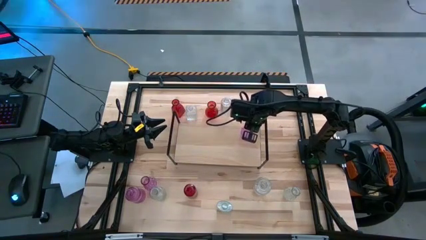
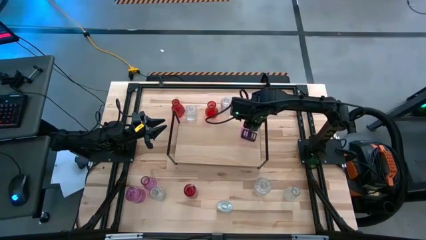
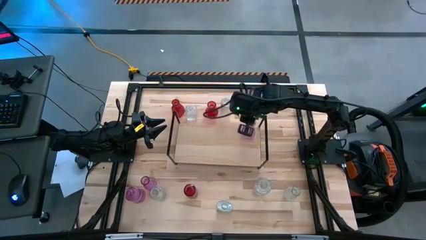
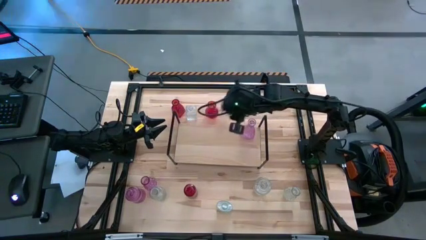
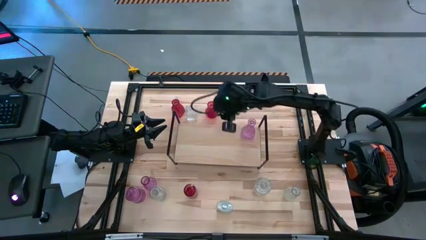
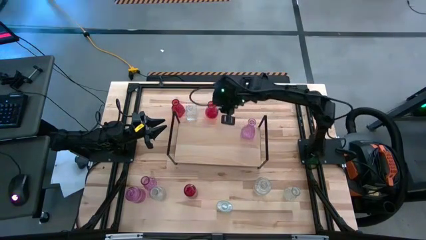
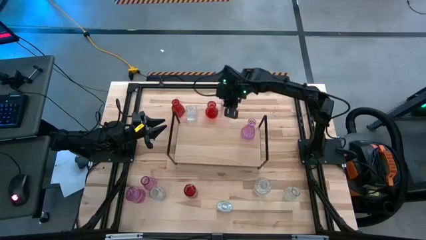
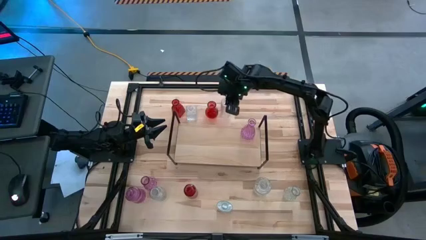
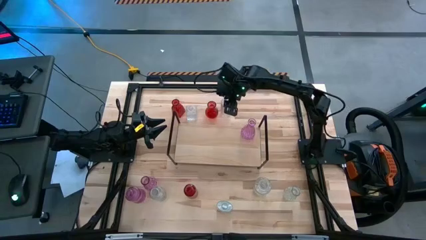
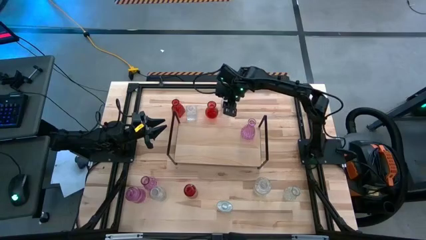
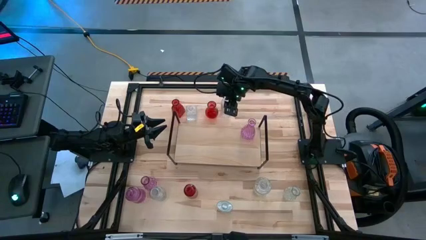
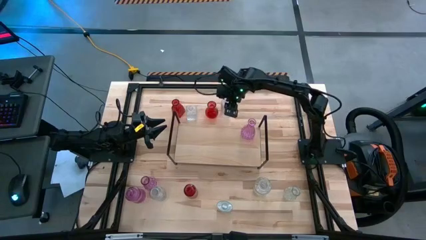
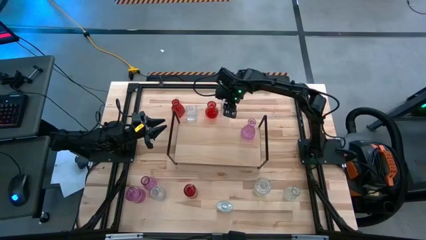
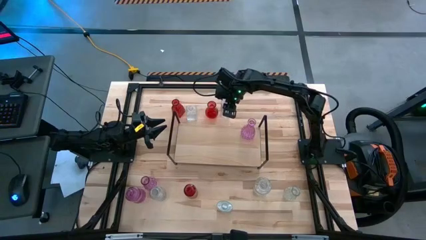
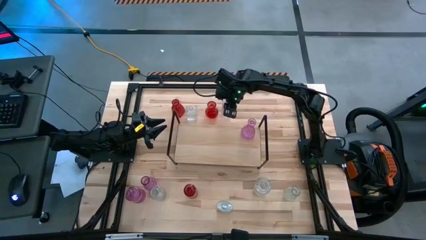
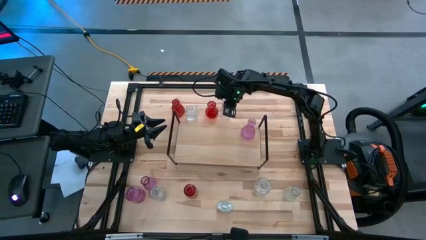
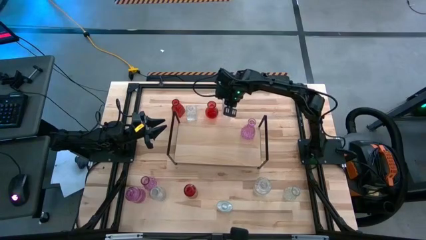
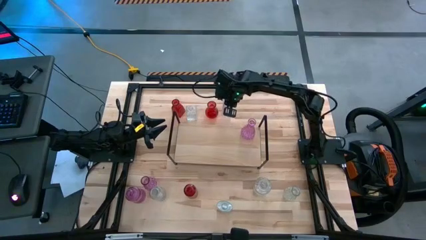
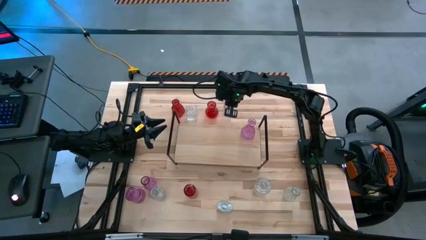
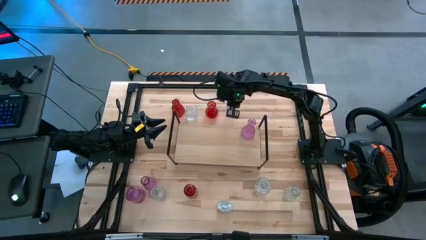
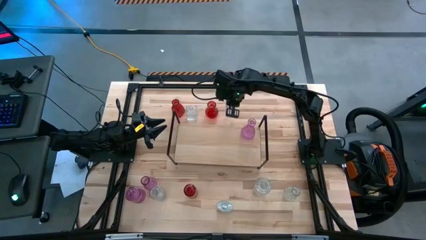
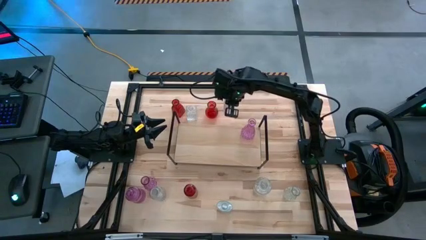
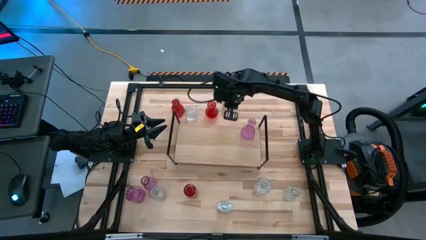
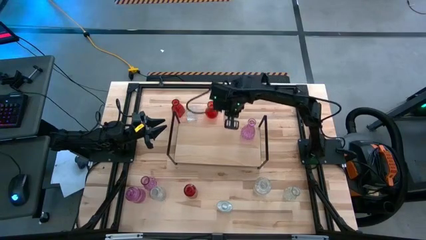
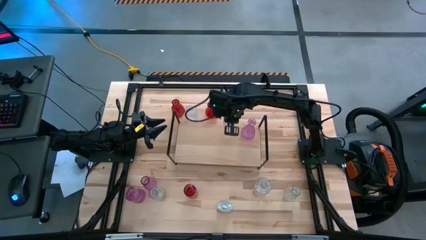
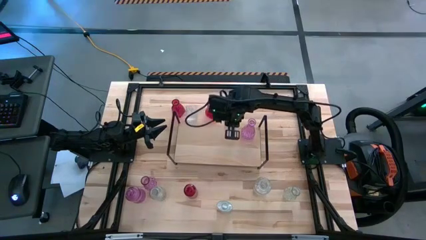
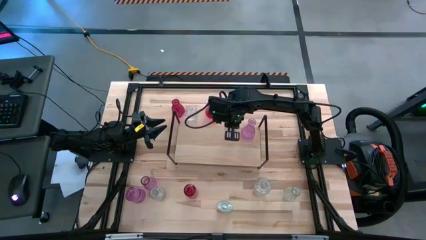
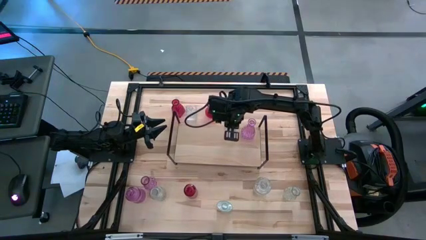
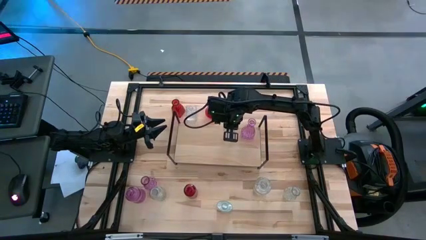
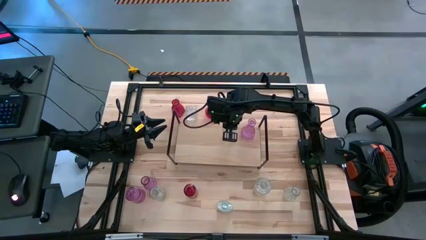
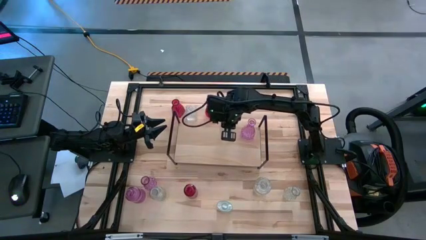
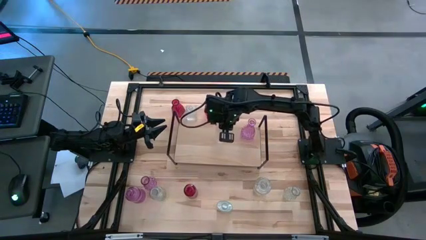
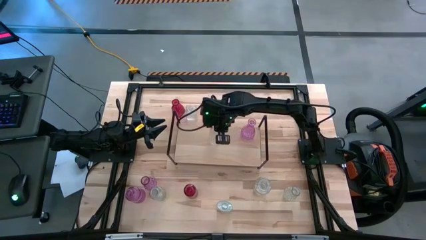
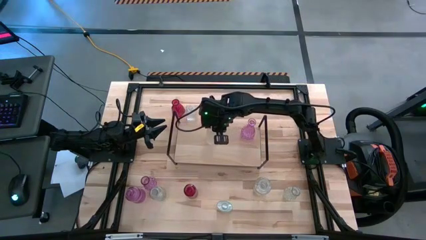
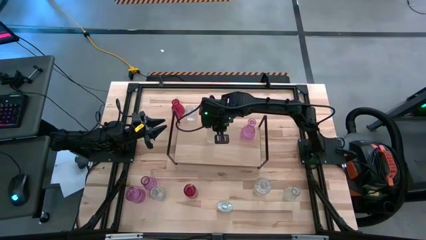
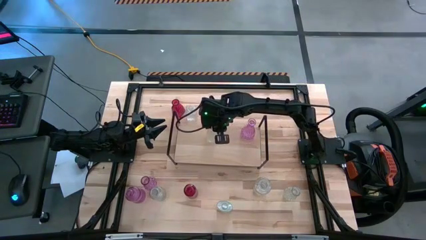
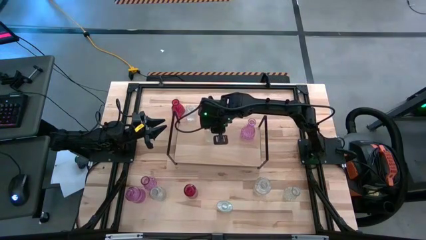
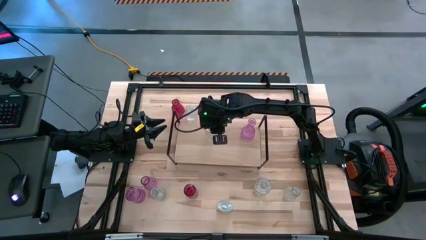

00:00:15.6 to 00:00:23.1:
Task: sort vases onto shelf
Put the transparent vase on the shelf

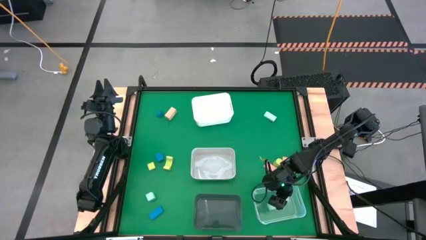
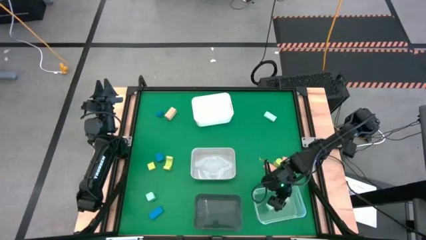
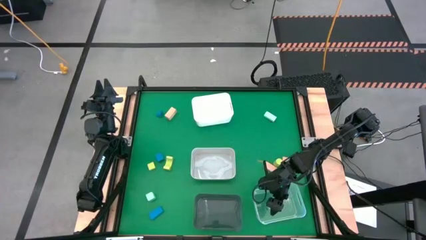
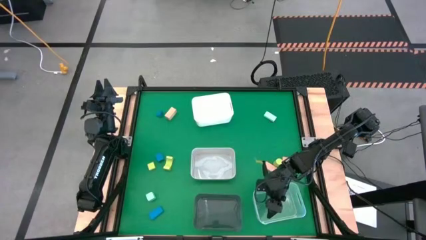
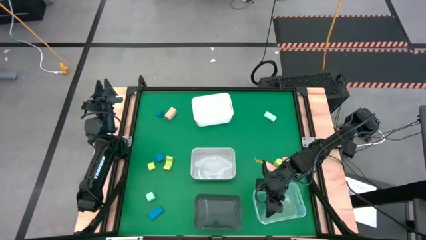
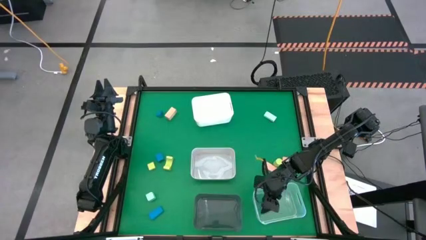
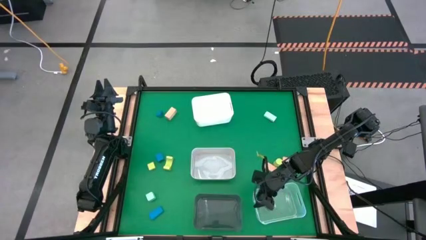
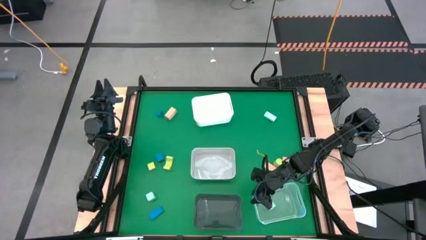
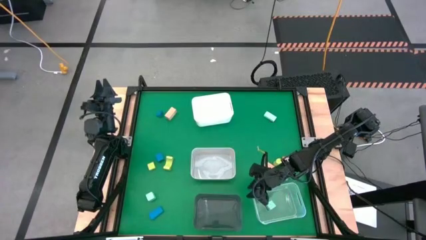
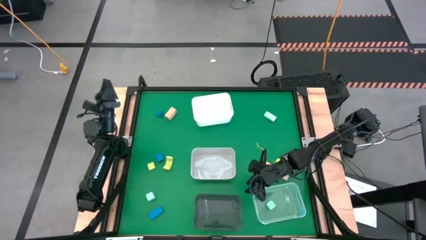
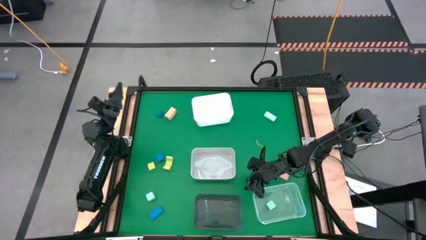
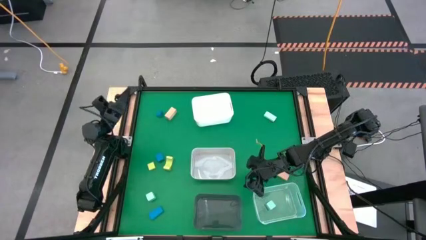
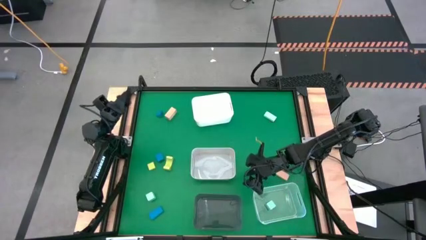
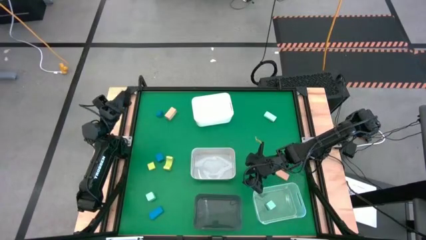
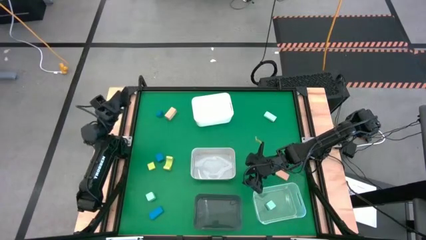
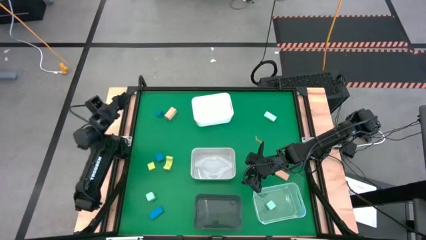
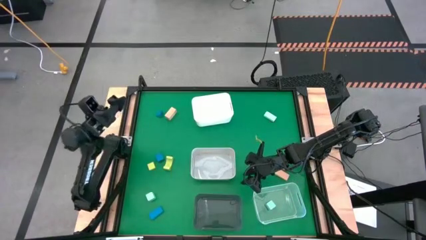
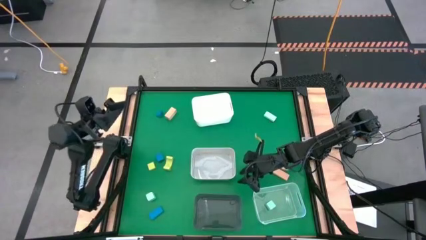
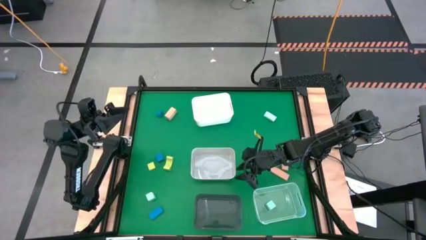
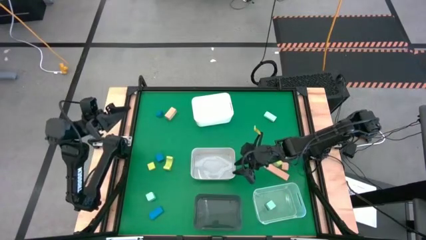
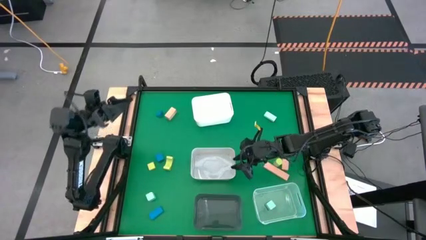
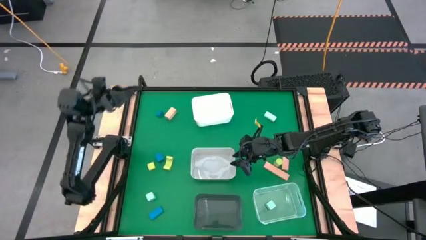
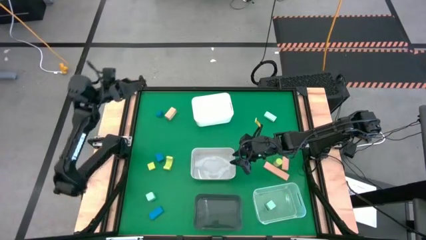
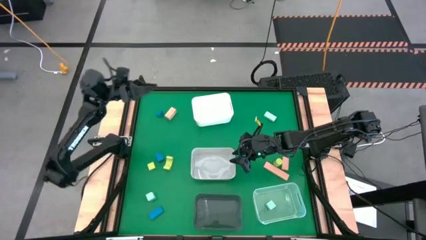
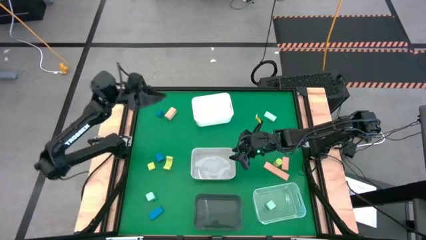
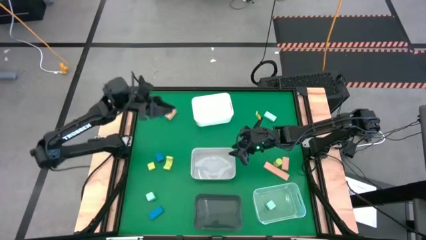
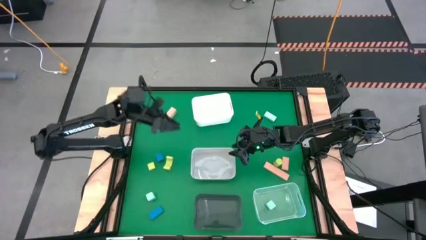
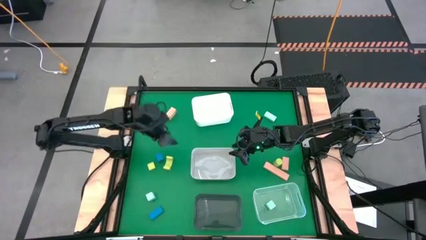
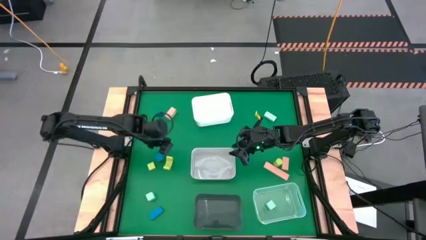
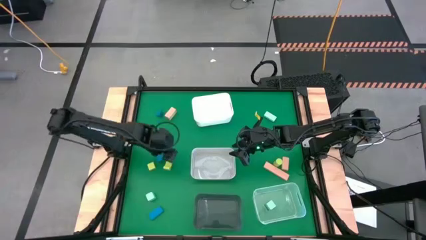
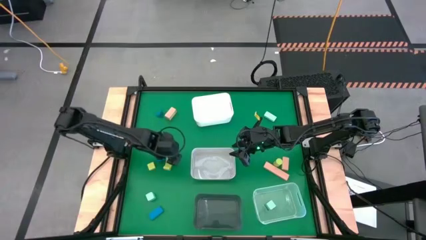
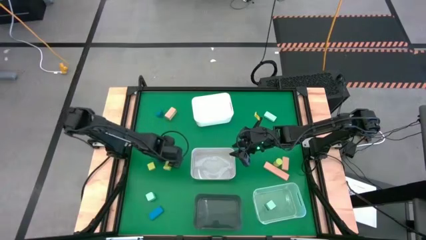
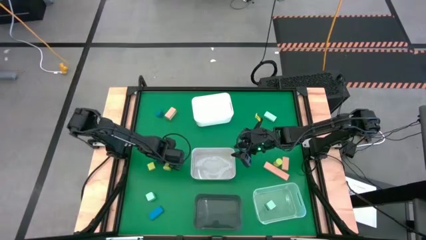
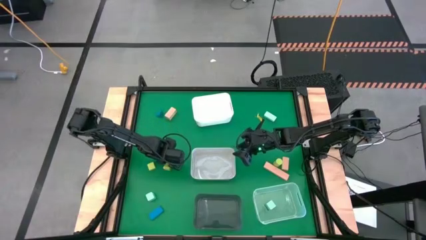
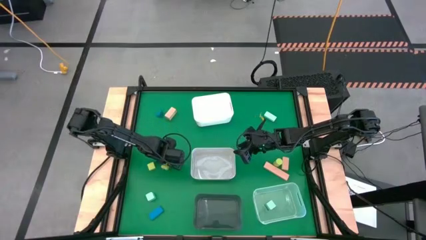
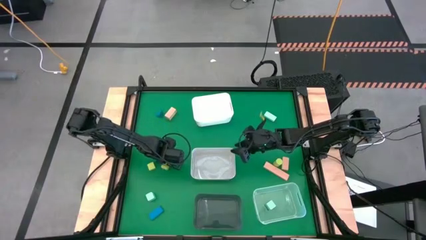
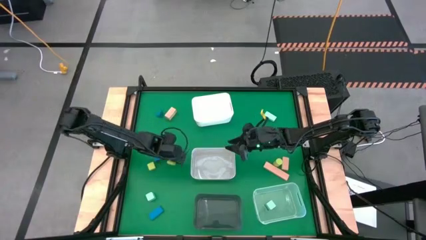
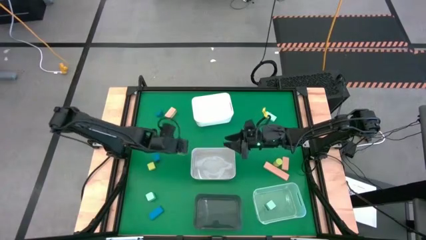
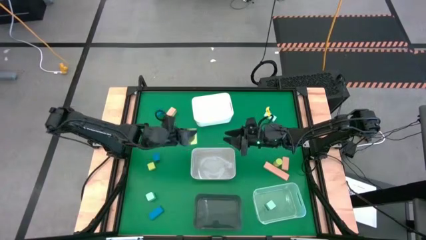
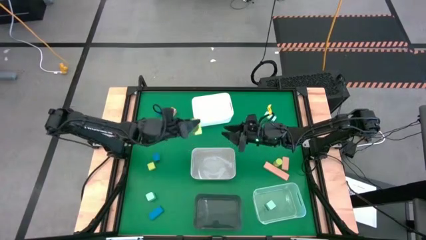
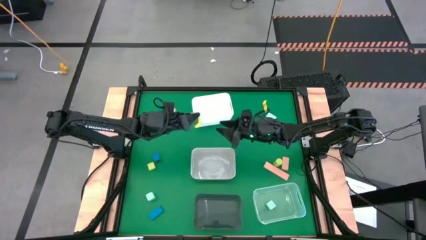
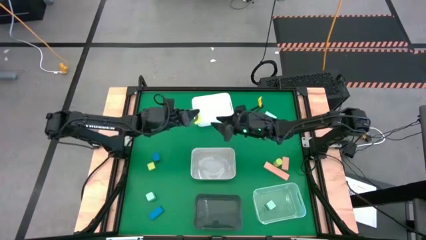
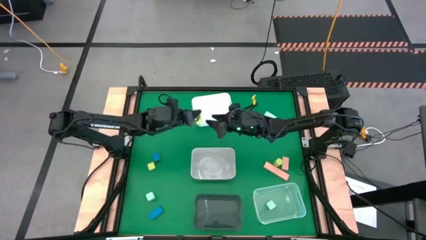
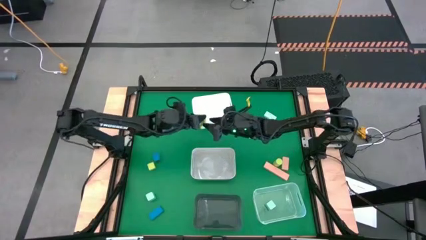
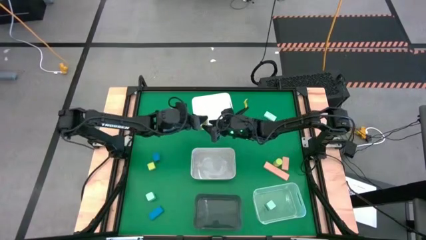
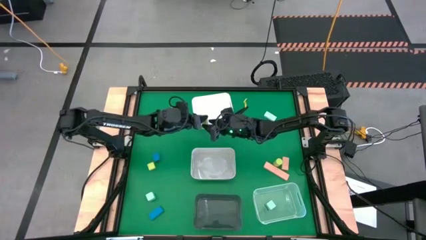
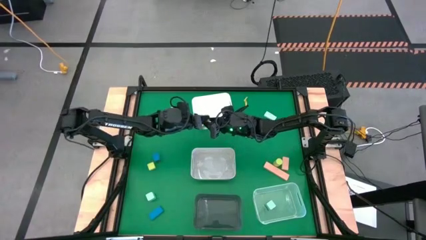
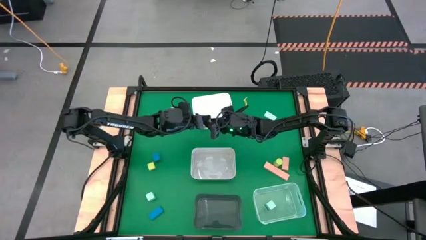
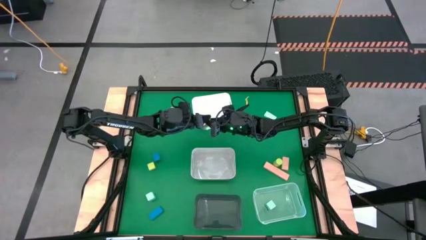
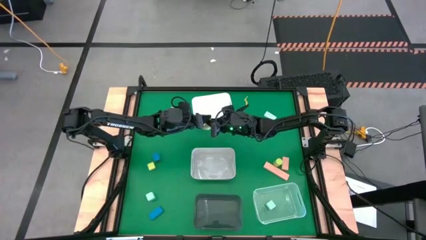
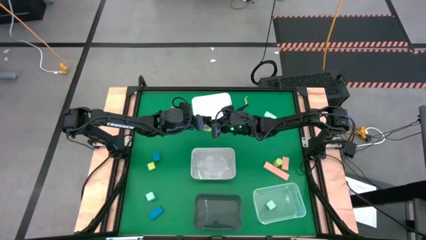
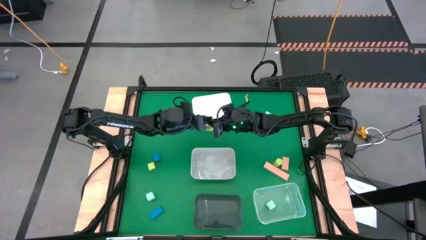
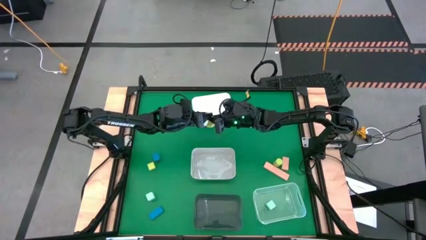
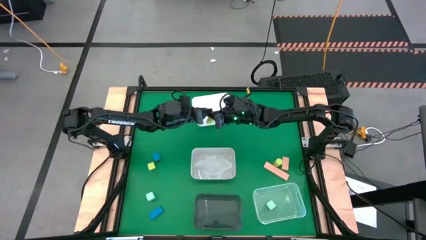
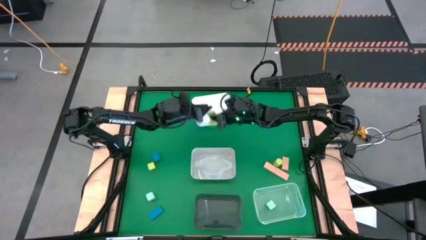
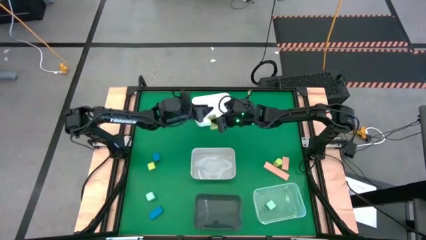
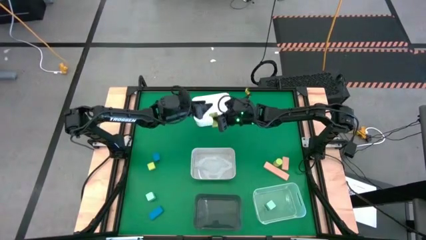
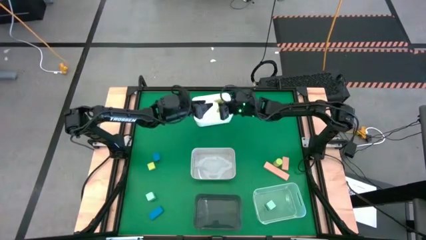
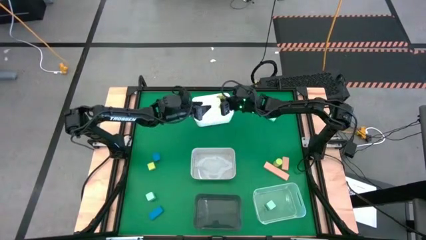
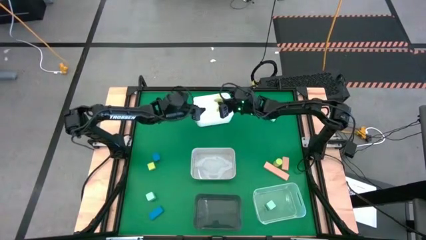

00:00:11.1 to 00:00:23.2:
Task: Sort & place blocks by color
Put the middle light green block into the white bin
